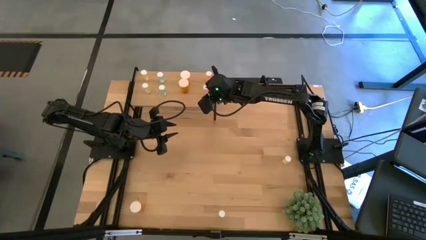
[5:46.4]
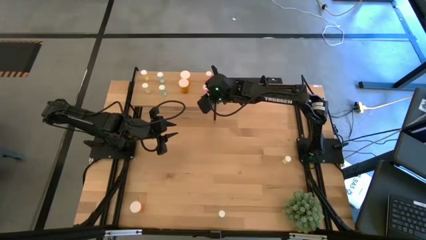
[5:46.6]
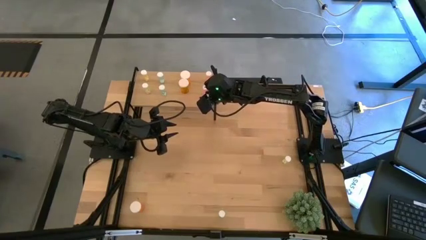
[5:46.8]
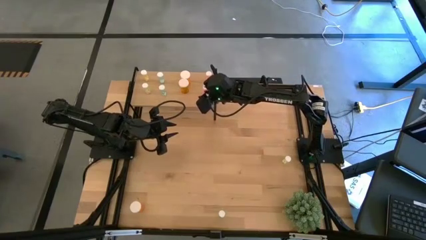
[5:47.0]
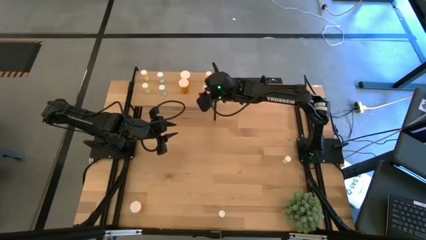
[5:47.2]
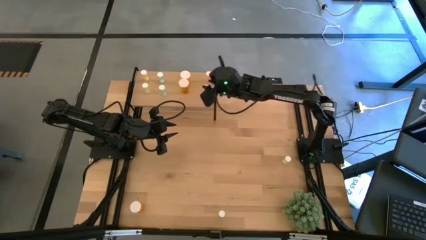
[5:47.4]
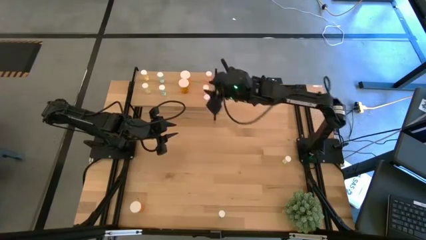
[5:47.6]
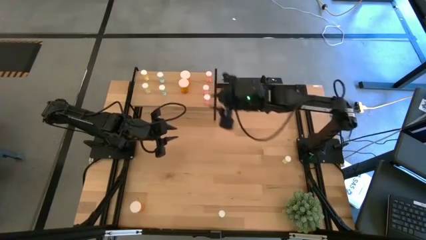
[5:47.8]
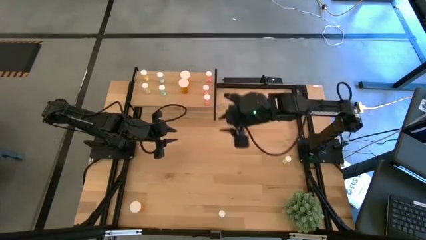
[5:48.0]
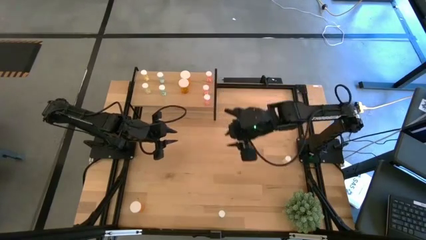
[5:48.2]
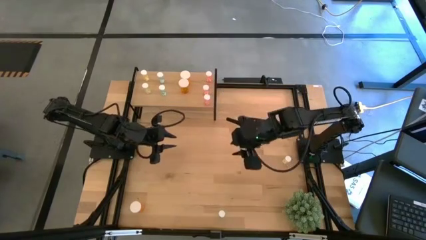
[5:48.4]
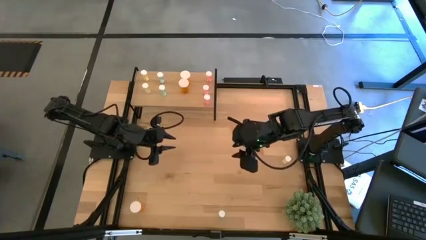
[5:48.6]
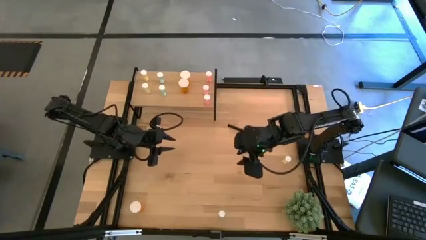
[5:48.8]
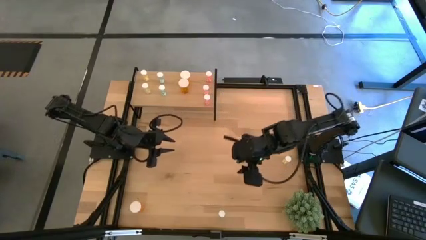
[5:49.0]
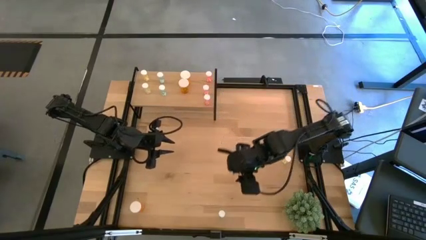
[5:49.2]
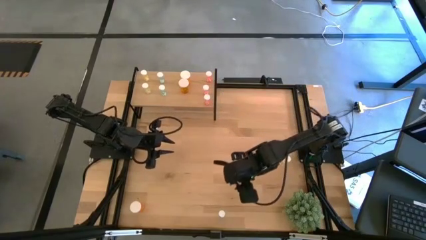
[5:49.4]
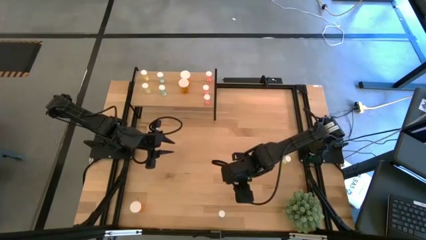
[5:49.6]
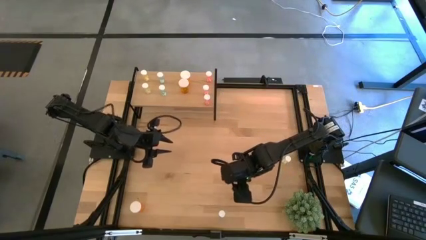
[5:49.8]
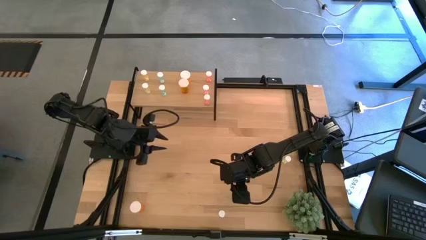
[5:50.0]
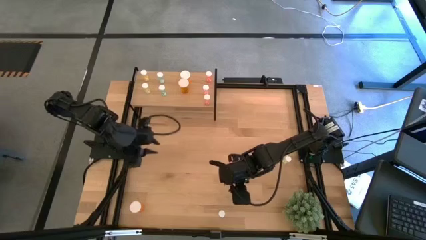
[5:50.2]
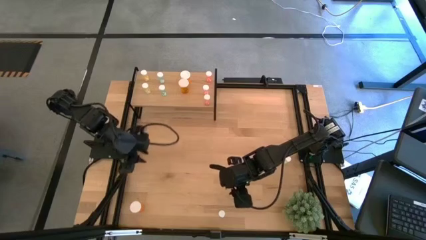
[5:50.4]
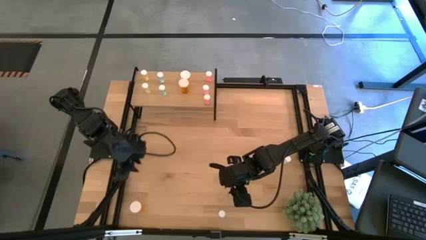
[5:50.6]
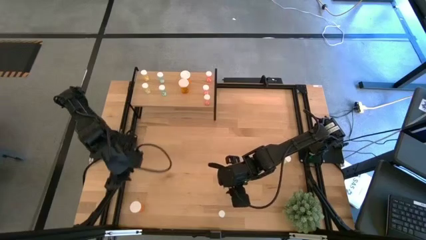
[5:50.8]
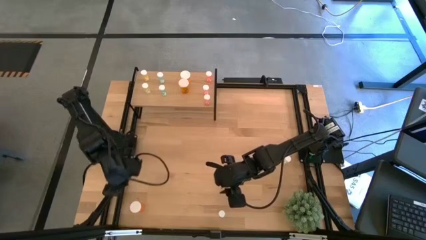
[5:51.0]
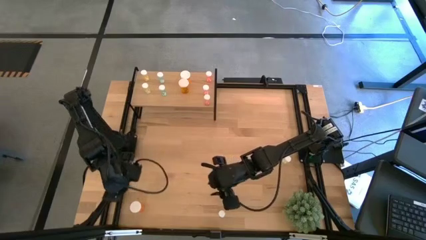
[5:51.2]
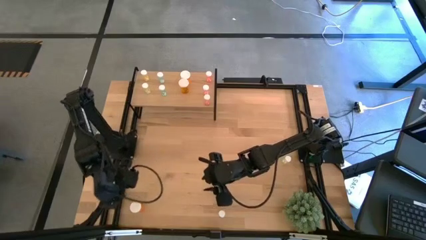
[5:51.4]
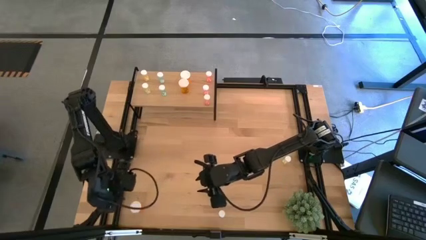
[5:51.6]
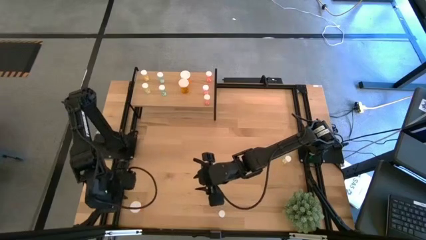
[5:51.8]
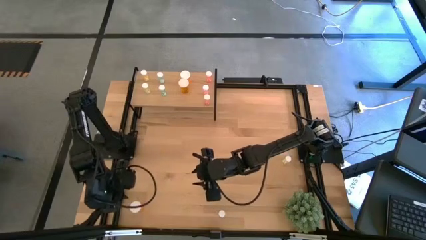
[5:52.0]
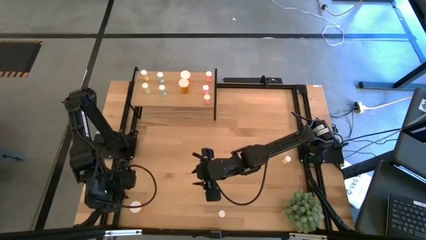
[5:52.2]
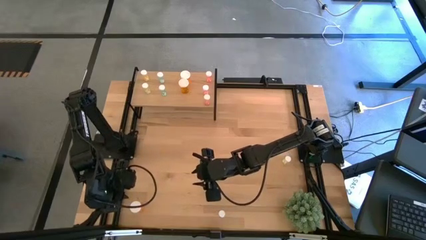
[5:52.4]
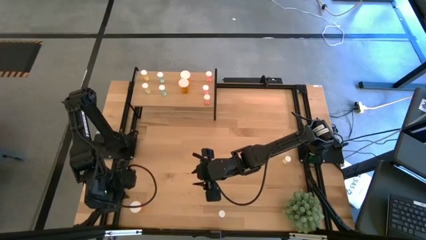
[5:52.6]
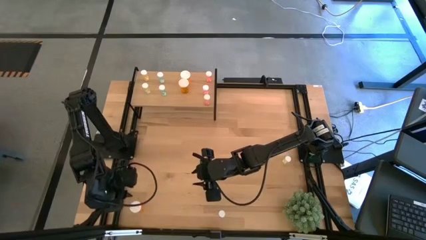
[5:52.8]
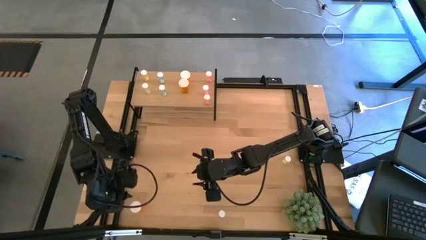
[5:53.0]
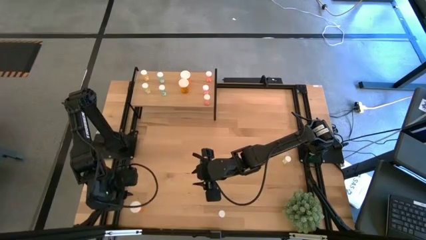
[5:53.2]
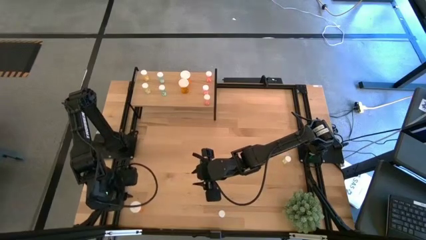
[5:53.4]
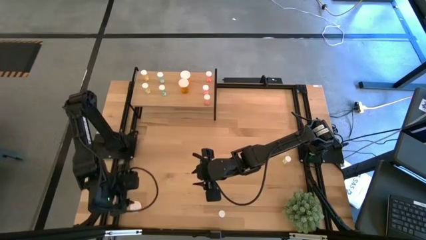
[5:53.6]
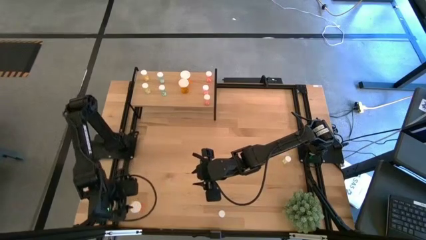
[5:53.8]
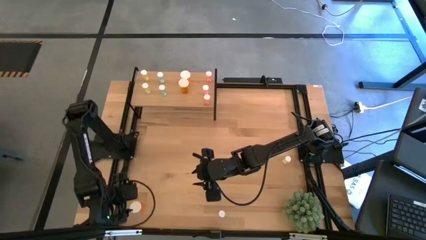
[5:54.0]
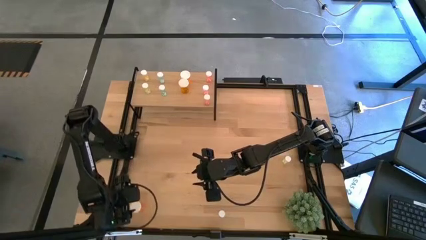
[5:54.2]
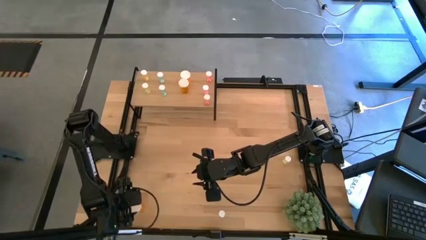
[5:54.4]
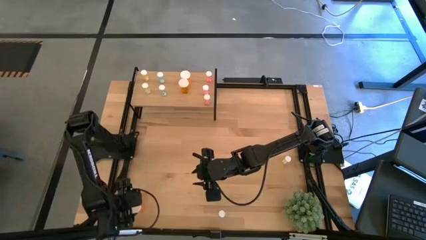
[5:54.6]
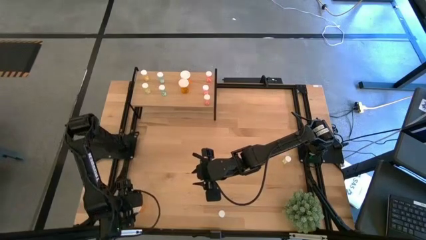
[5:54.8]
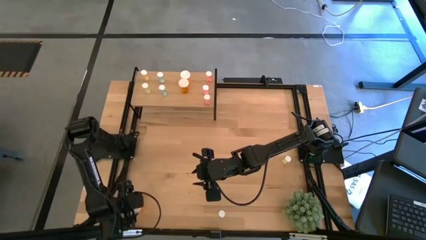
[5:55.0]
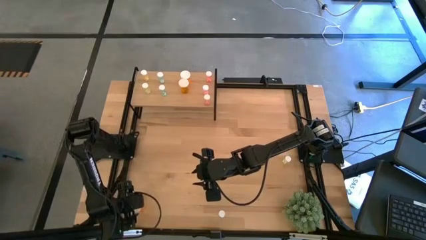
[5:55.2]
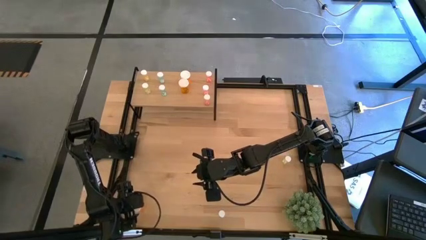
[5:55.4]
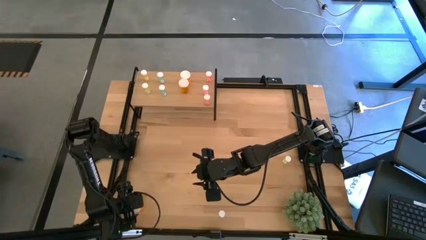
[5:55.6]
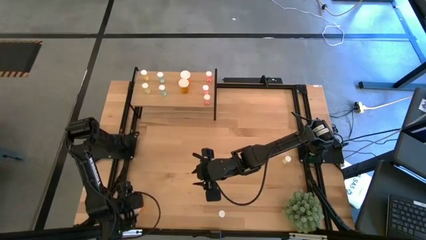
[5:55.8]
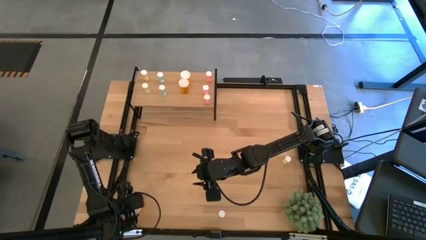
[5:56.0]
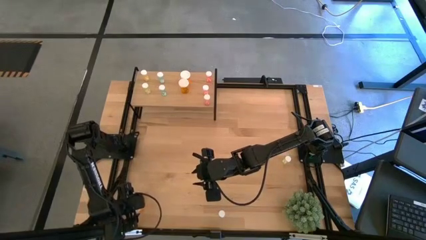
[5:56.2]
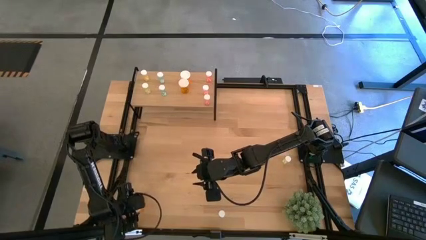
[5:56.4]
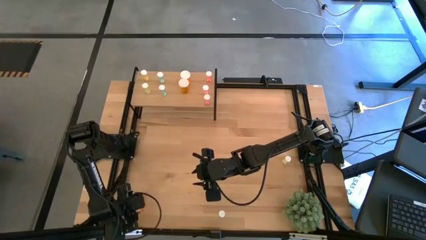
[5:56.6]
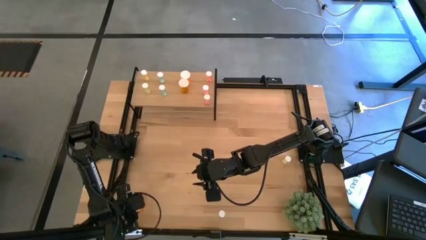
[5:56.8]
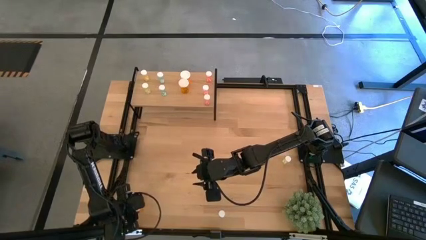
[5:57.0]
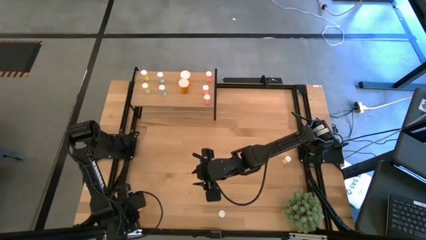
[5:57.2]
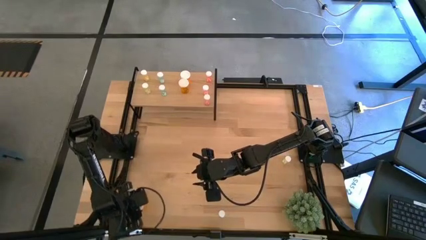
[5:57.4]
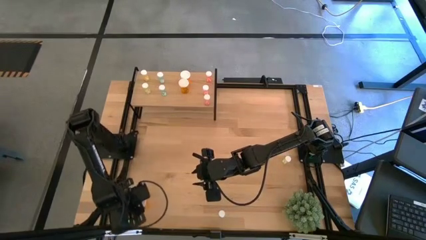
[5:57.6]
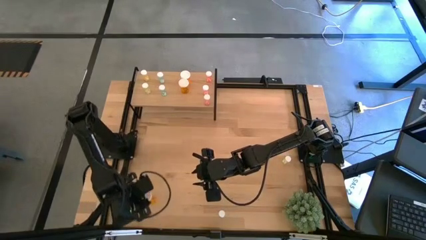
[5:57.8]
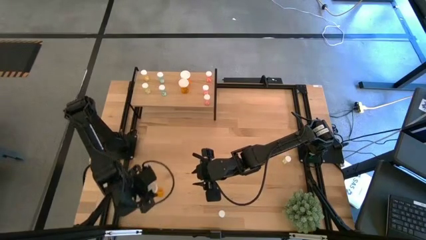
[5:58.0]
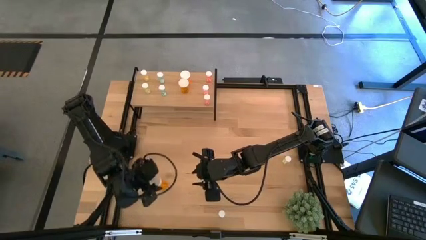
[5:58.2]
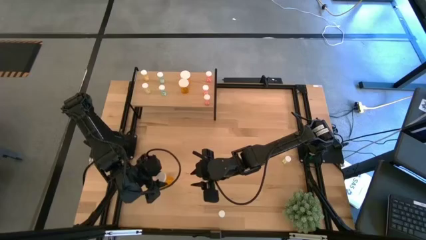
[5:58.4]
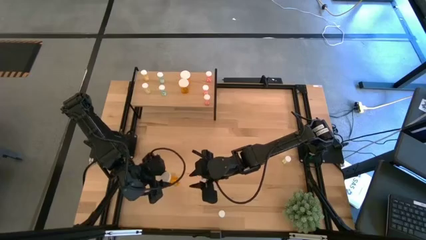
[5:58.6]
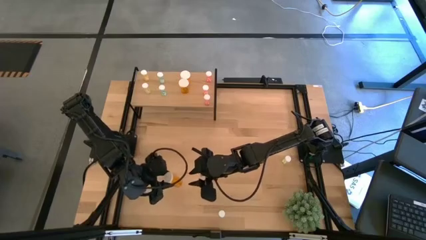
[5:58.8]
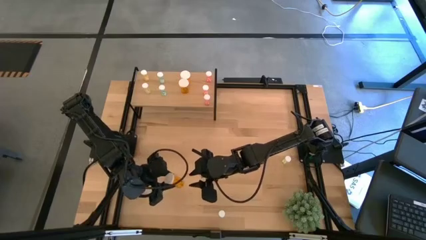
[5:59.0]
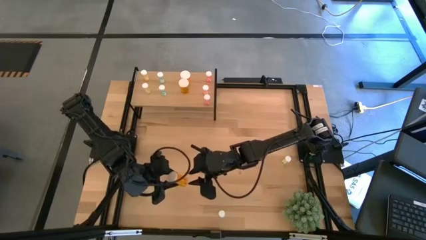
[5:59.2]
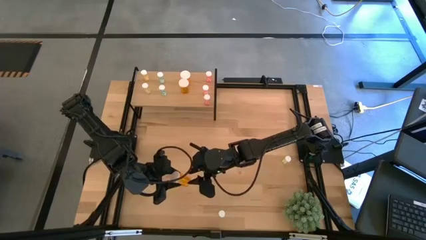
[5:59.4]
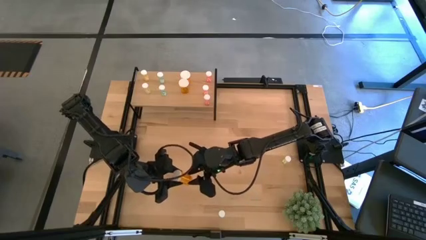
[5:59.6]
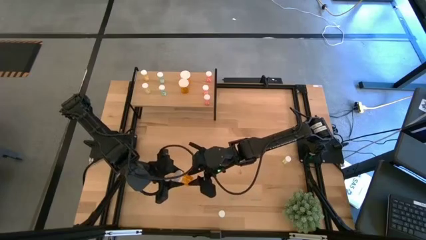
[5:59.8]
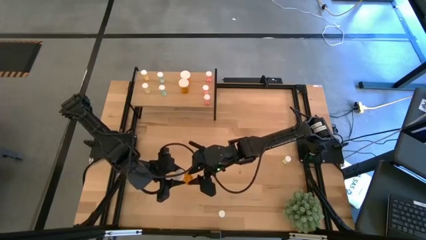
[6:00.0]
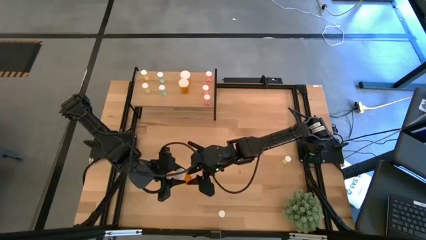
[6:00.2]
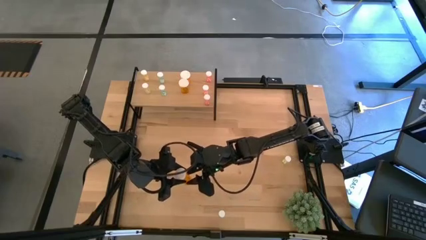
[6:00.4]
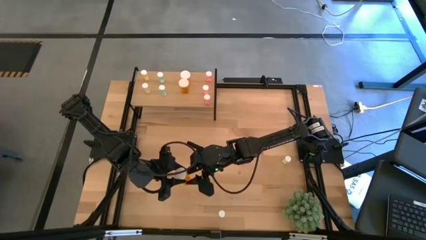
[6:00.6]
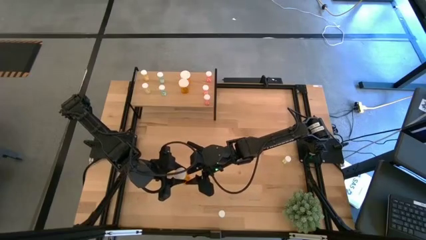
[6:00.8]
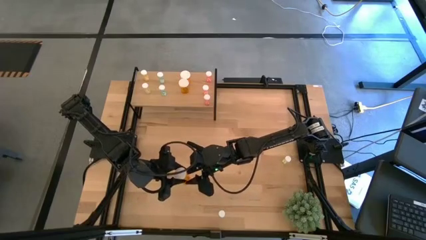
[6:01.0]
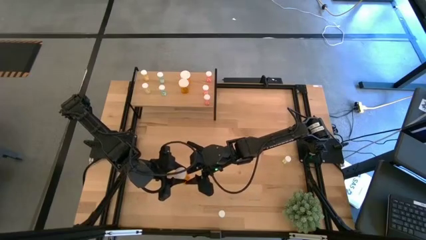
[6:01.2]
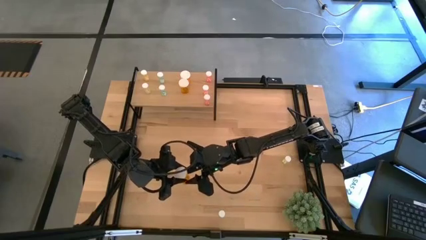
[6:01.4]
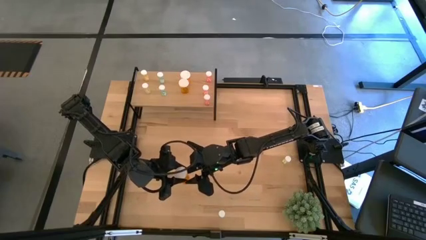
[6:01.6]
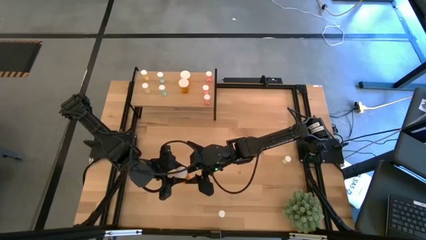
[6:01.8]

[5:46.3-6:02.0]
Task: Pick and place medicine bottles onto shelf by color
Put the orange pill bottle on the shelf aligned with the orange pill bottle on the shelf
